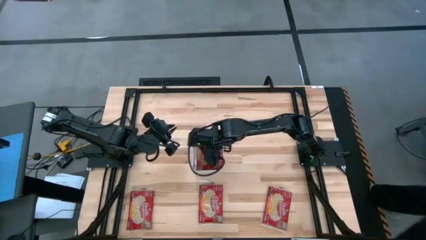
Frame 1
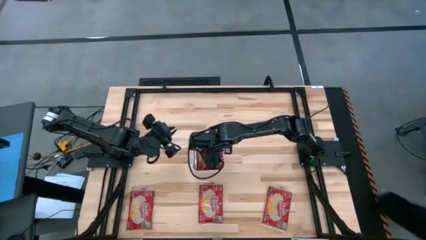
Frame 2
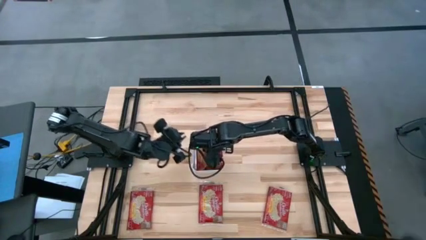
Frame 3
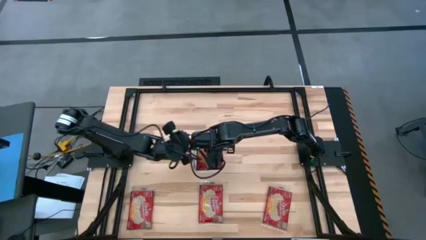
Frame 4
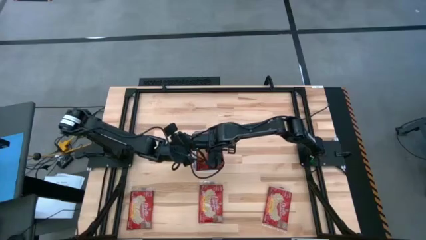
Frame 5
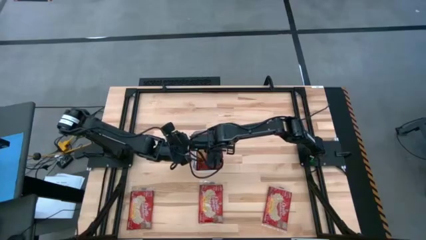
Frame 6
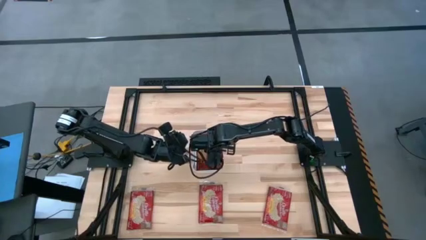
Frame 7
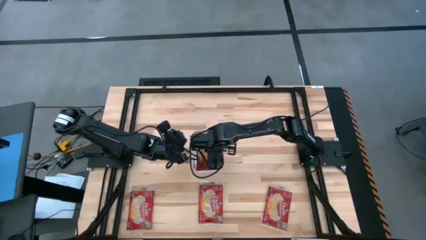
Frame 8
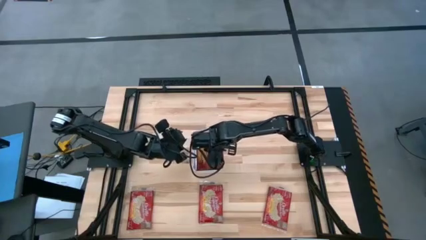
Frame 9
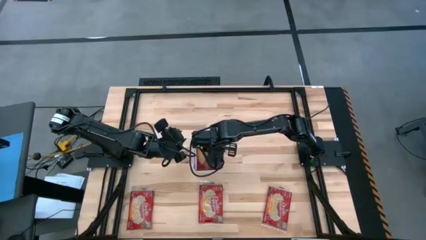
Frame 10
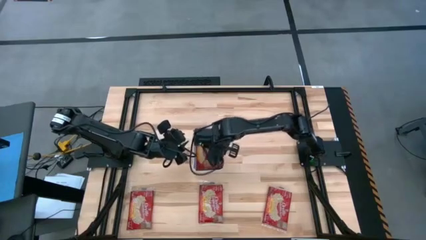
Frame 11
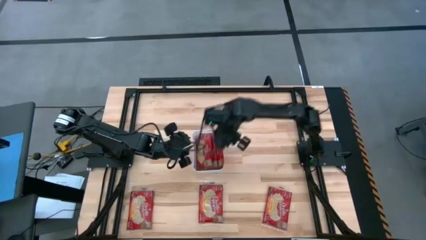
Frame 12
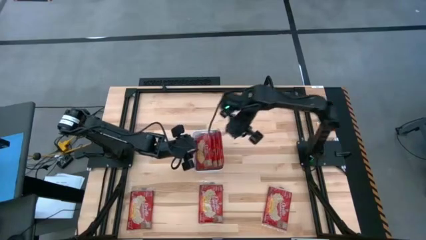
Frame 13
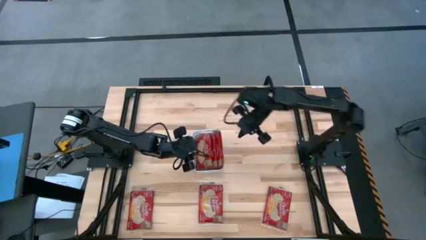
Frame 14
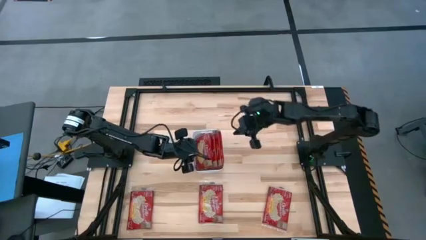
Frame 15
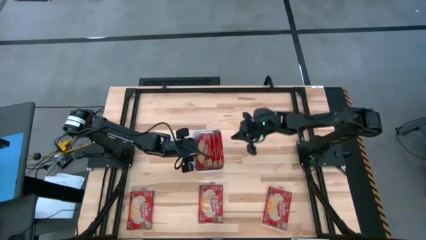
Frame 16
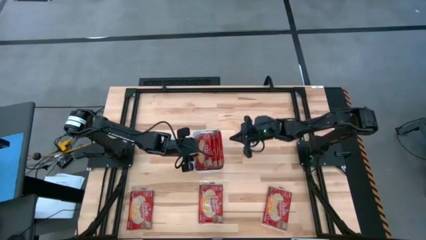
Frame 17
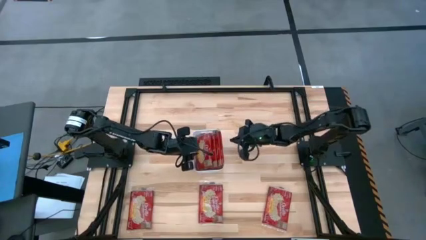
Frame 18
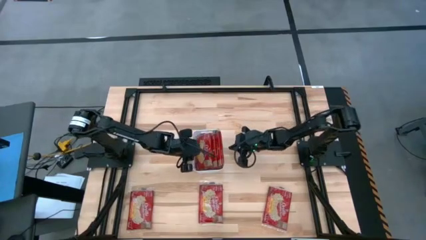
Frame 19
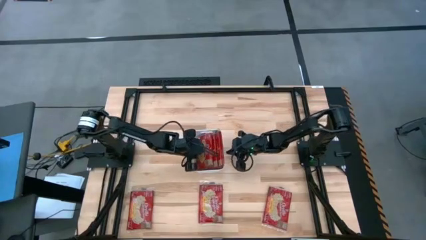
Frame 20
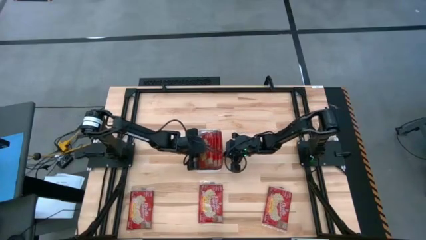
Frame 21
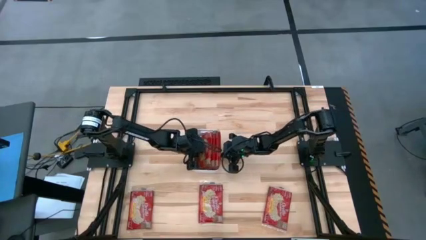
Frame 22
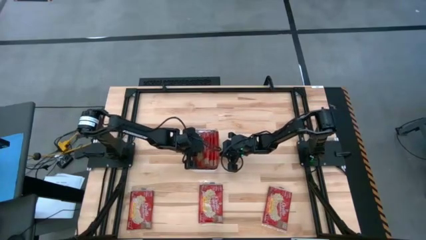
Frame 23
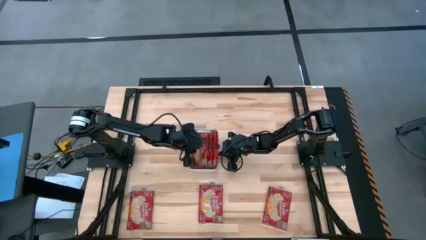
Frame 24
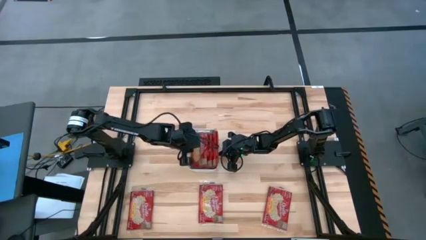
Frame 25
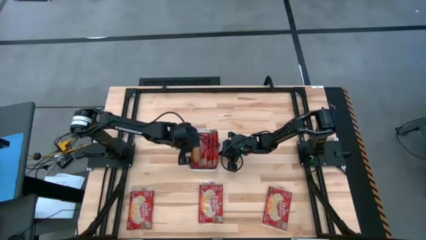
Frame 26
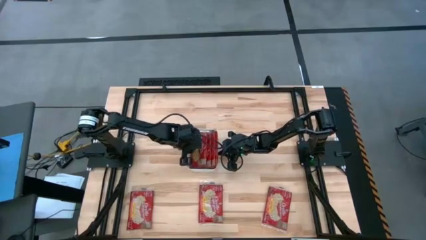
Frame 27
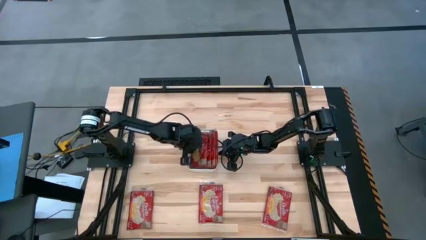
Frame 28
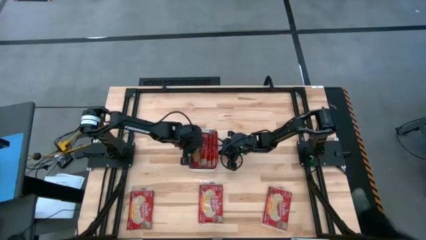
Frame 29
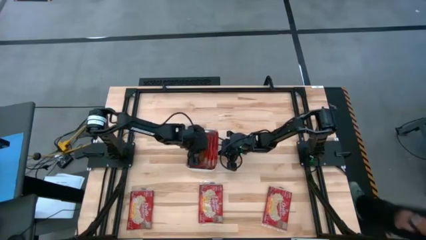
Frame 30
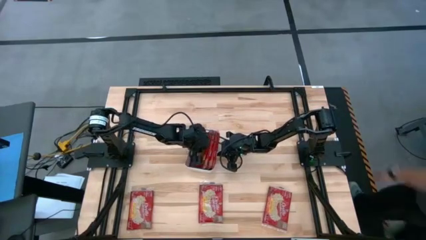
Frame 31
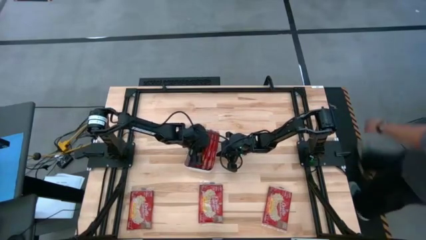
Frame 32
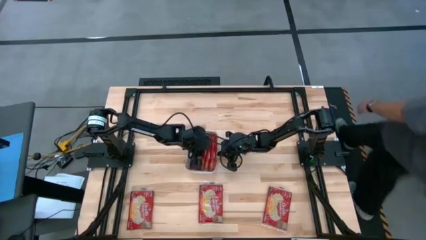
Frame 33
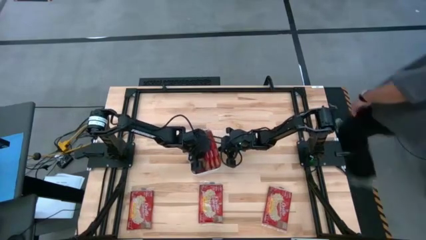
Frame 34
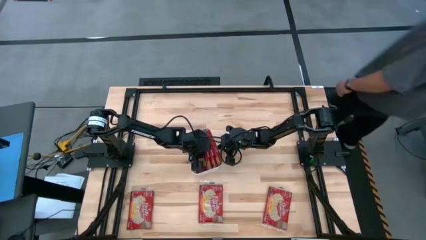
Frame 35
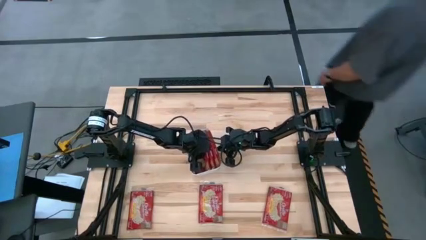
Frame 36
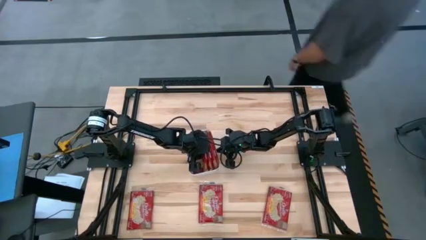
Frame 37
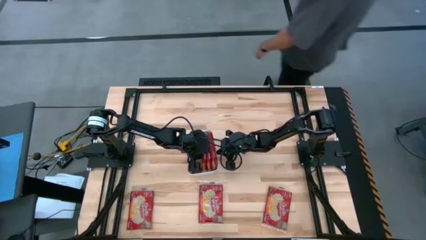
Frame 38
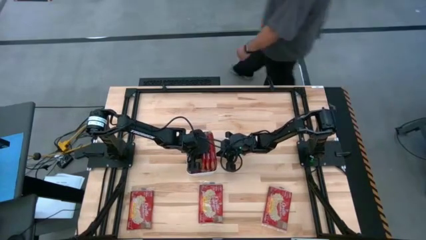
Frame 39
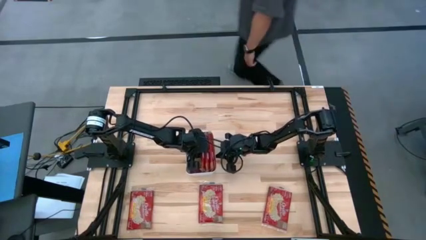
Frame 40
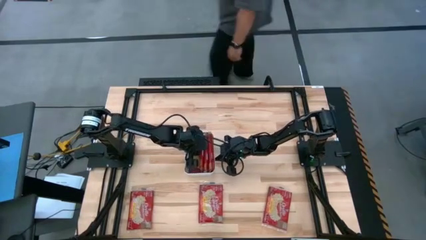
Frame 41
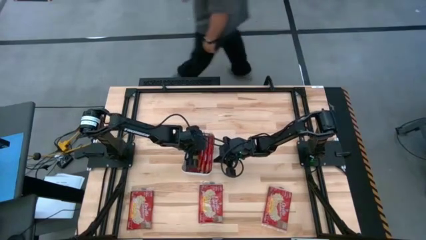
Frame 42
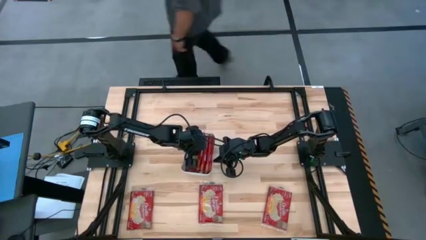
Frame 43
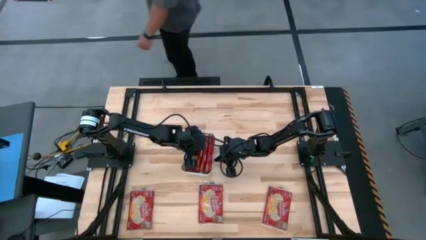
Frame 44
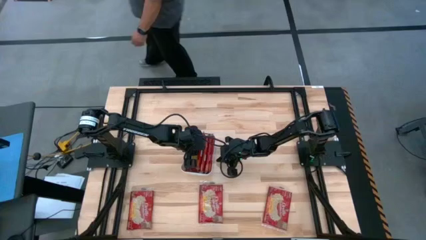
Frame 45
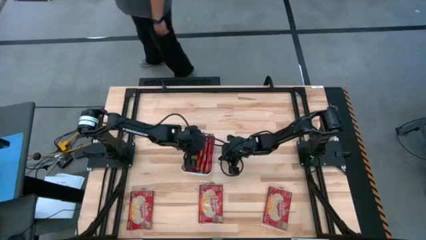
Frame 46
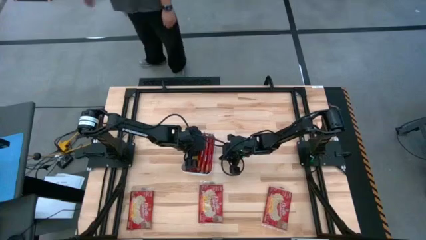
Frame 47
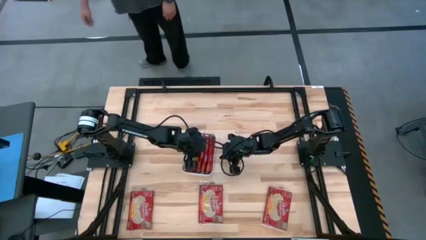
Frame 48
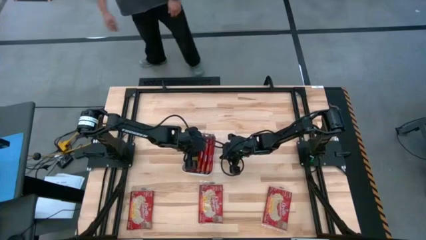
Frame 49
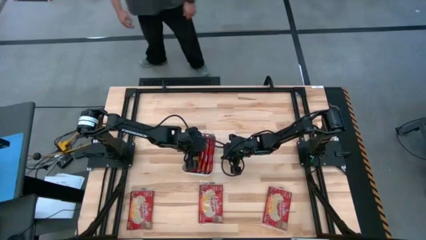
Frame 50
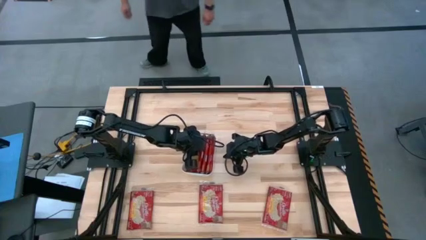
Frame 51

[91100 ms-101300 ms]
Task: Sort popcorn bags into baskets
Put the red popcorn bag into the white bin

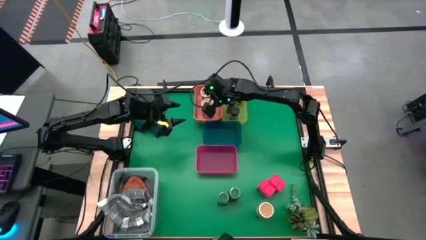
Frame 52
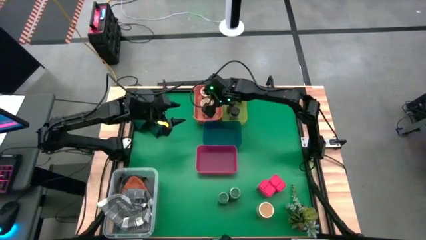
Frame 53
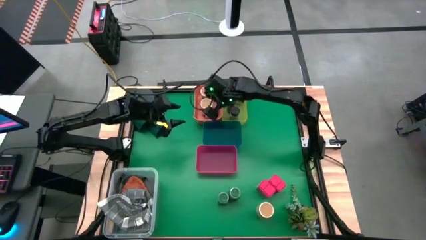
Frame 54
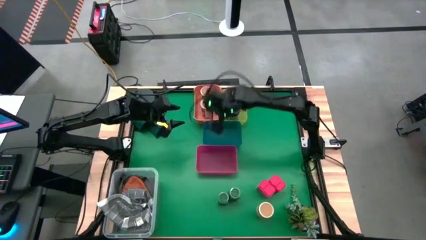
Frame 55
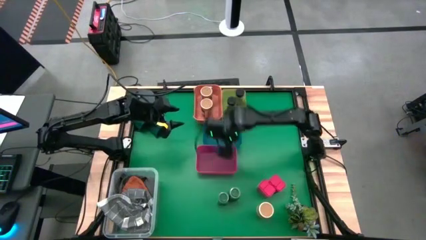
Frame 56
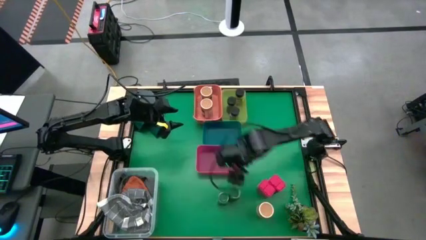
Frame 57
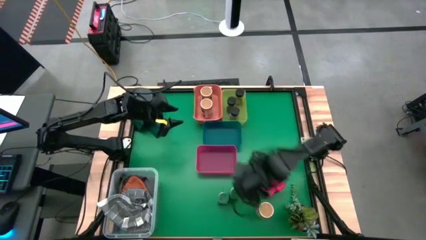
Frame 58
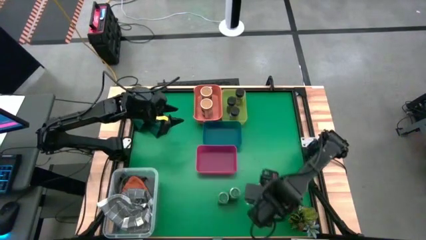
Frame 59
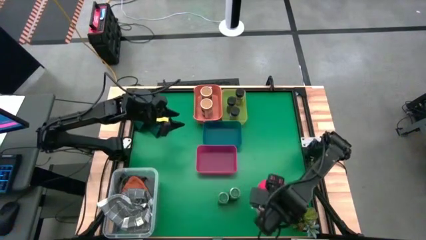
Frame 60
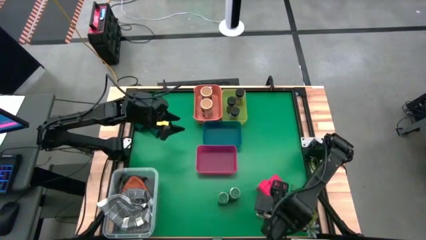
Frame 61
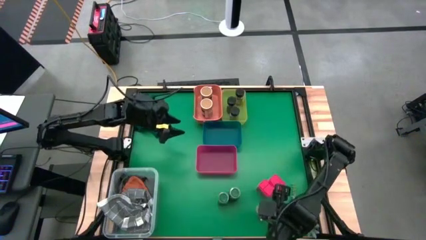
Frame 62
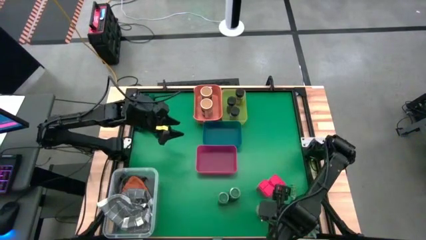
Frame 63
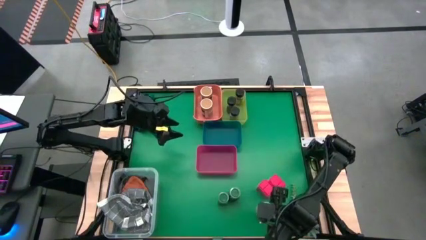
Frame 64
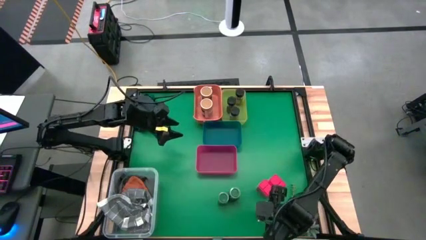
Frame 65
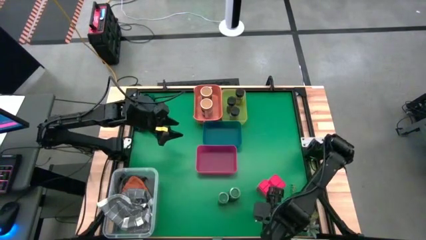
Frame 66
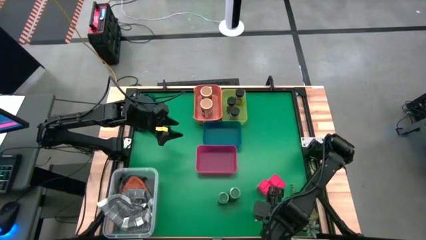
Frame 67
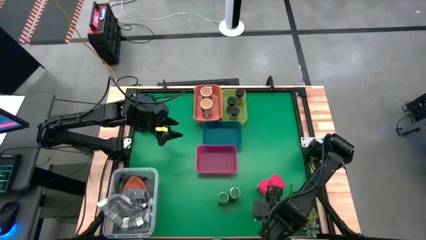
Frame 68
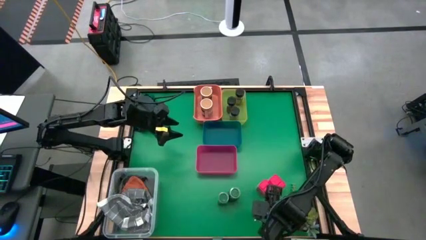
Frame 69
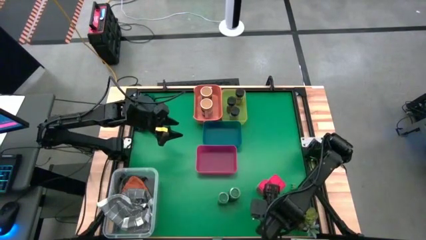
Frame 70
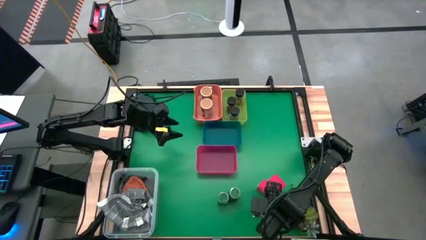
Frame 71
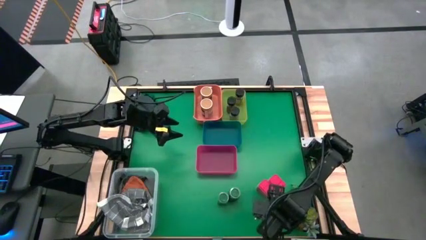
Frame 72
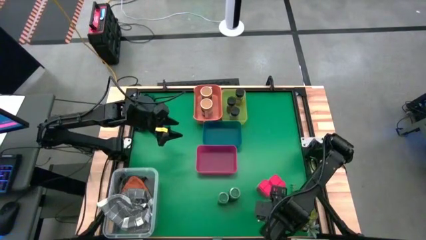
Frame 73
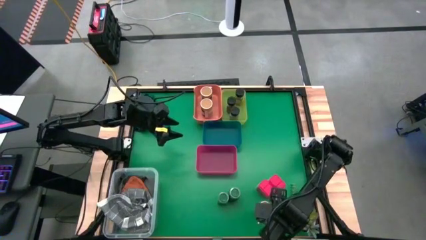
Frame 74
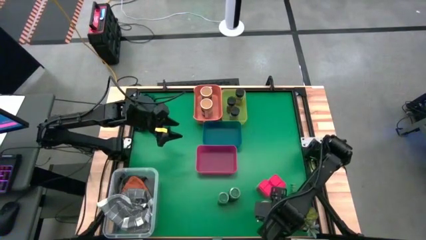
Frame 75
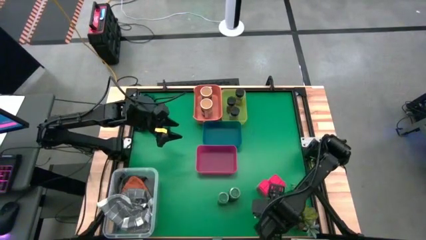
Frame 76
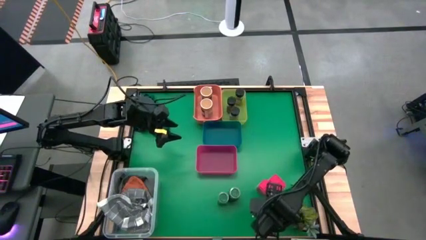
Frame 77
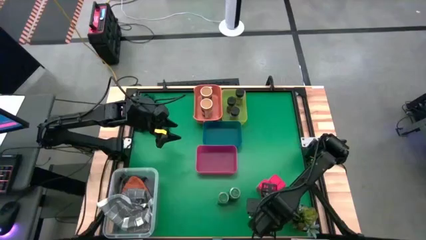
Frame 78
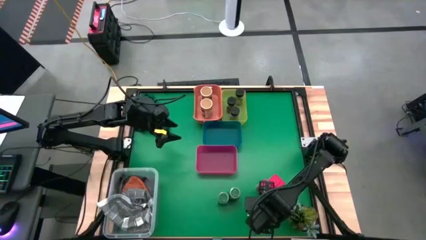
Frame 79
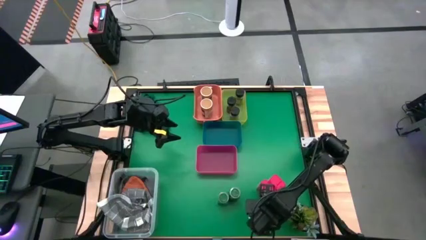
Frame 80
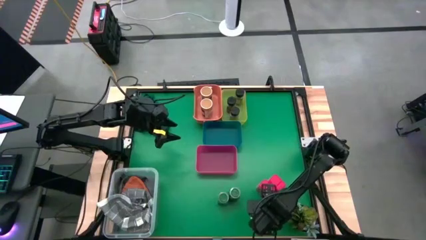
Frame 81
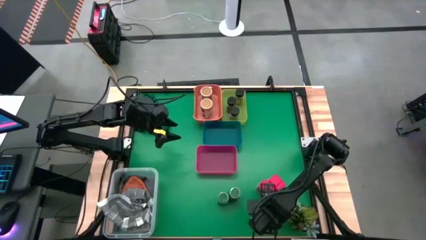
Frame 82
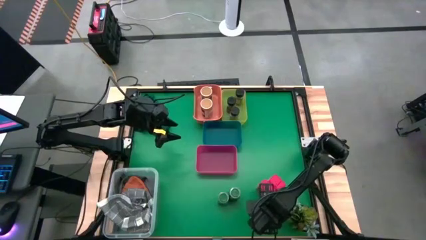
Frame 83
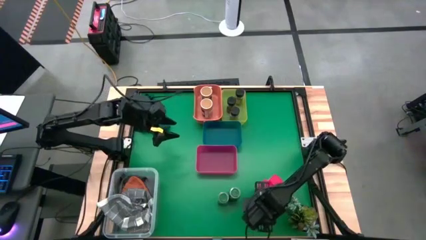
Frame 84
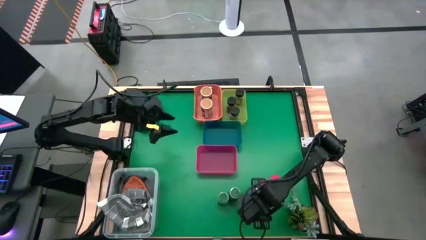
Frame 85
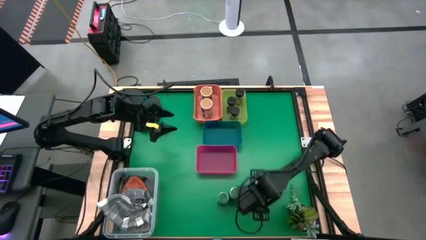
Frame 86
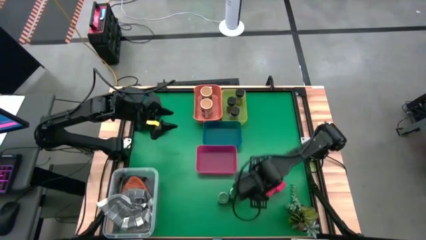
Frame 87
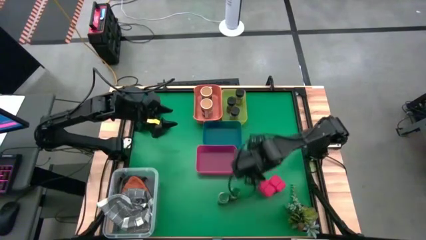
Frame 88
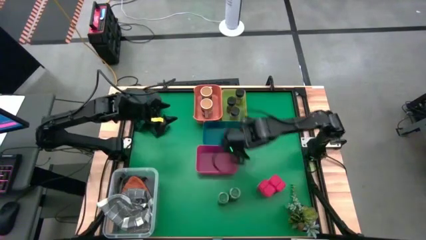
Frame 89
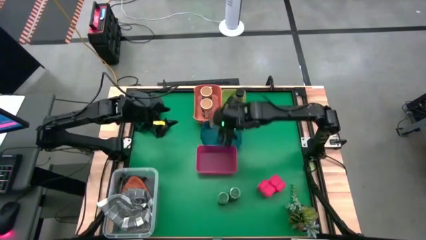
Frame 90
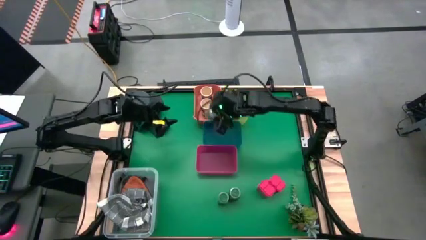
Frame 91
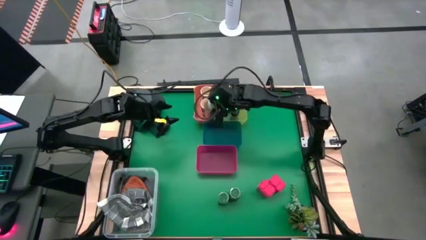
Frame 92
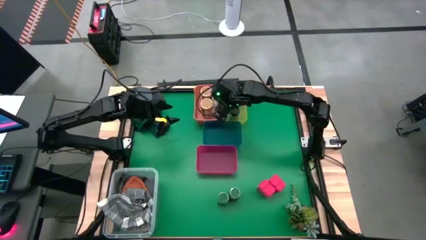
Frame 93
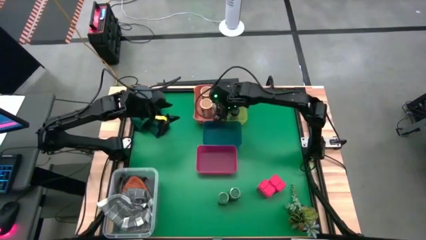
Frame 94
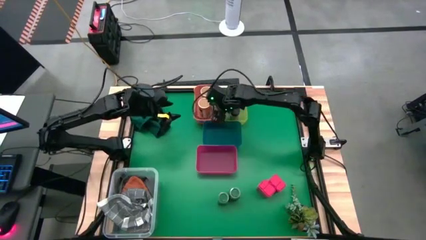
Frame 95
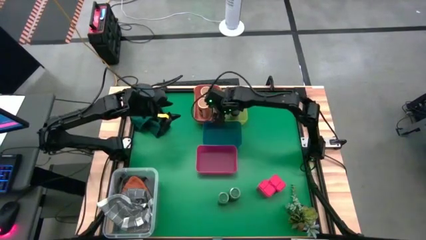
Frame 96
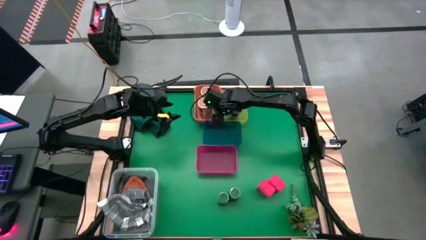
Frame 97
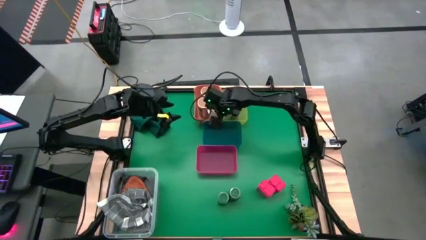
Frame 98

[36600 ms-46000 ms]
Task: Sort spices by type
Put the gold seasoning bottle into the orange bin
